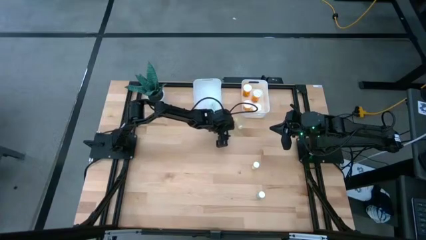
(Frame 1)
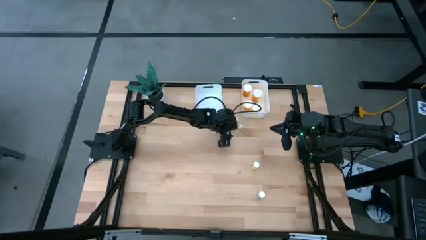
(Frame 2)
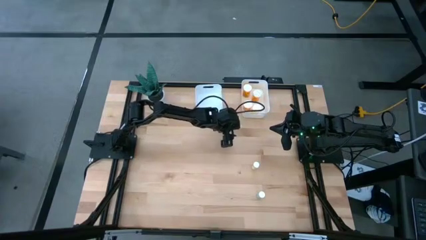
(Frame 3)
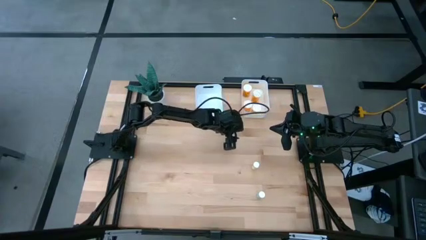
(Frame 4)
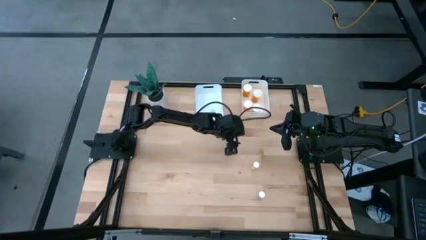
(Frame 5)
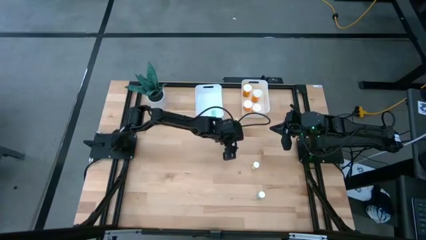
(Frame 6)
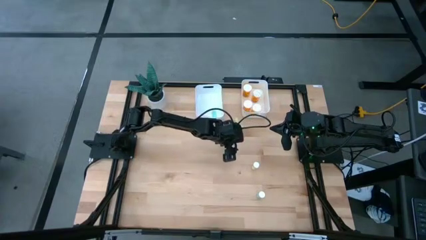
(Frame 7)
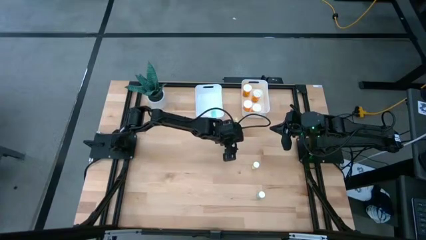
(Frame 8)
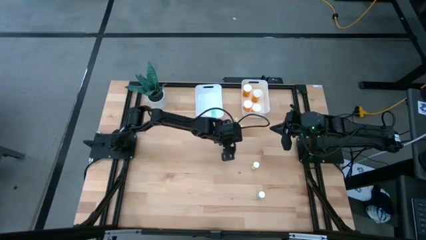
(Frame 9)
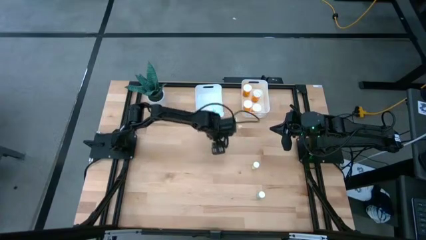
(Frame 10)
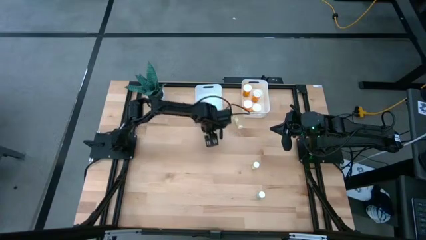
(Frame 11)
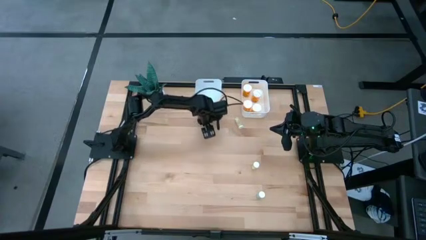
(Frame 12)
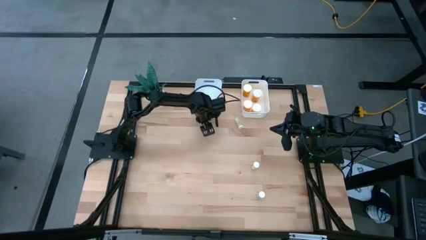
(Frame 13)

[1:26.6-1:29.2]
Task: Pick and place medicine bottles into bin by pill shape (circle, oval)
Adjust the left white bin

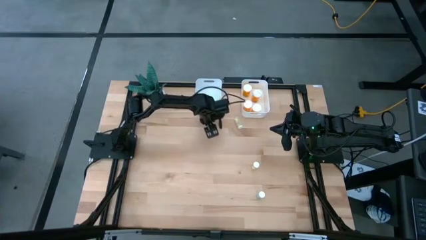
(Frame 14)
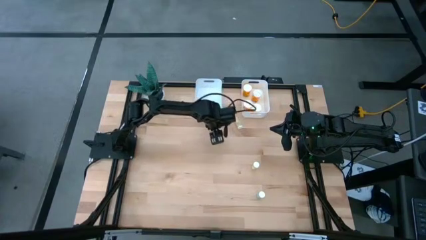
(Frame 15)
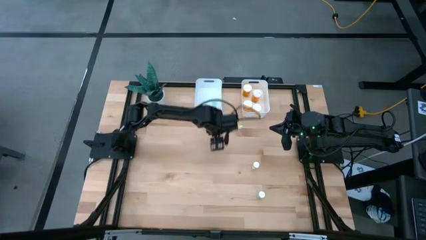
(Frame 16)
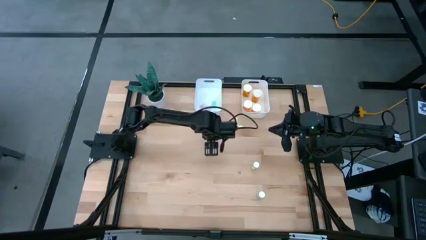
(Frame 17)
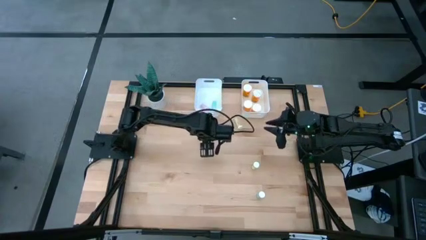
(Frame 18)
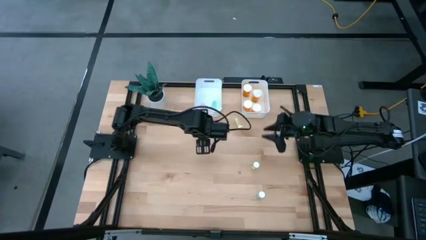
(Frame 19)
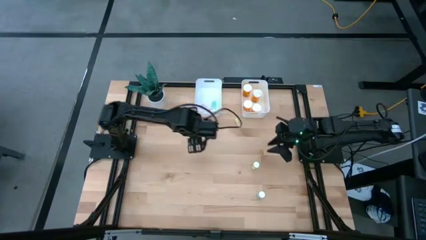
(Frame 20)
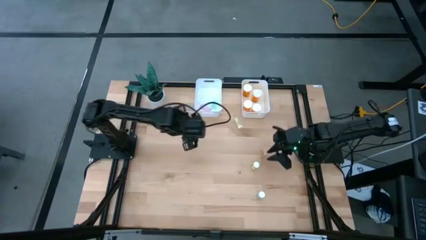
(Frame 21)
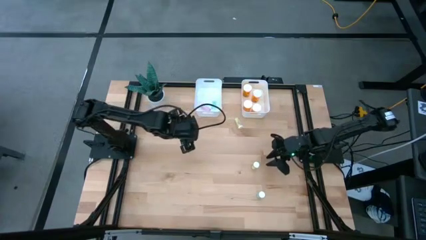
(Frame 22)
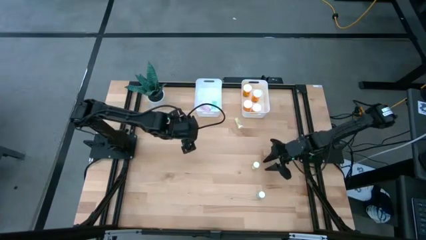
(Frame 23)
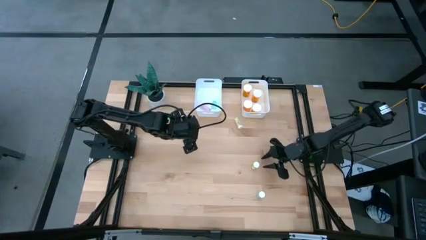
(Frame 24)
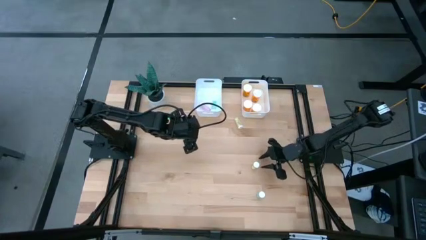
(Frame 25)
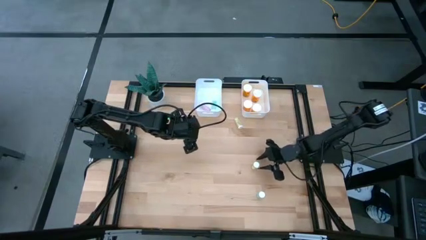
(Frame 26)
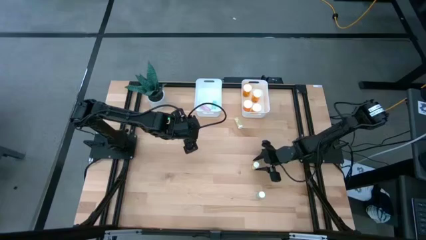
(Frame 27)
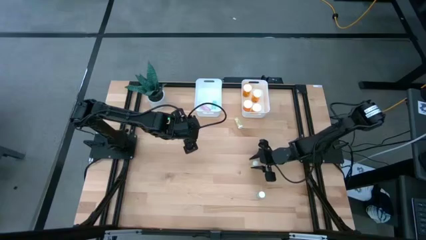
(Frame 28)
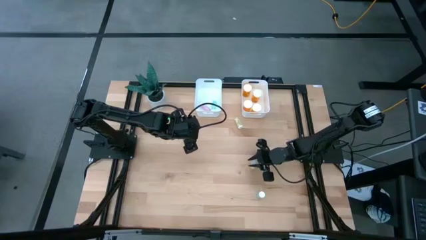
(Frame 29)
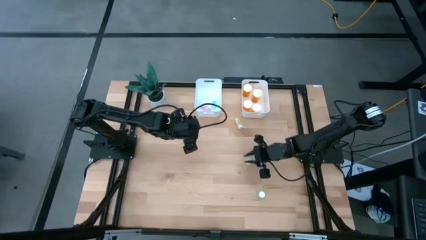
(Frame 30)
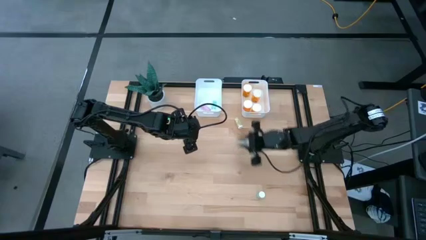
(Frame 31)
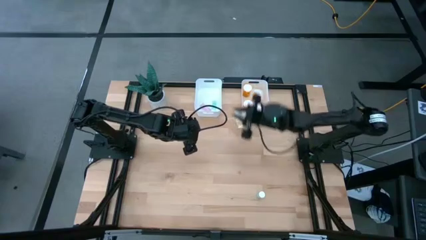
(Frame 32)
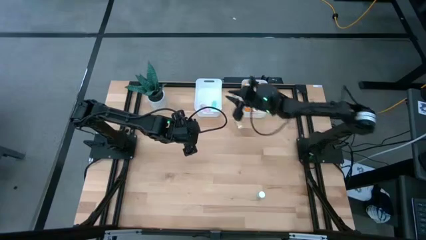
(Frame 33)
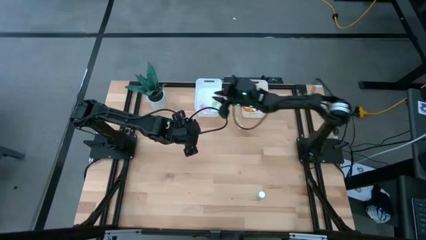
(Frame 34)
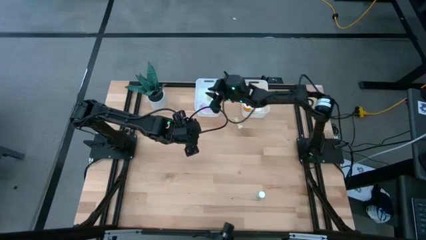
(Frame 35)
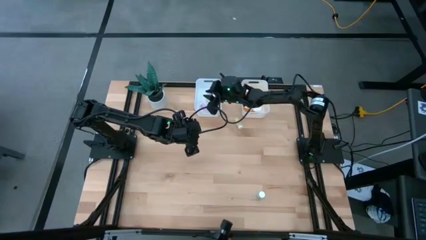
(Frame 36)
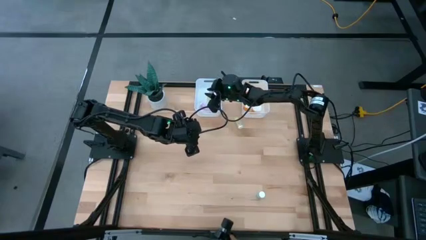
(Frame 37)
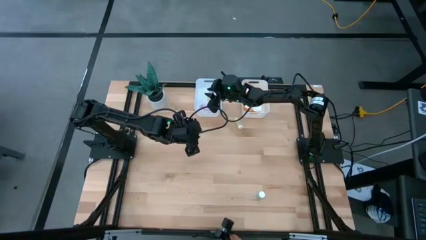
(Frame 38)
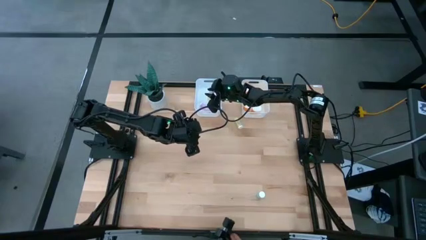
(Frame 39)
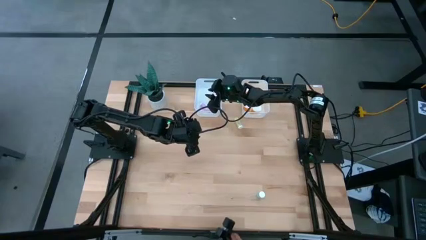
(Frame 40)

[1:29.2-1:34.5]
Put the small yellow tablet bottle into the left white bin

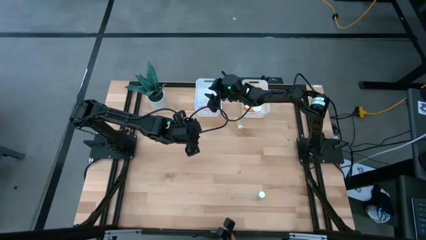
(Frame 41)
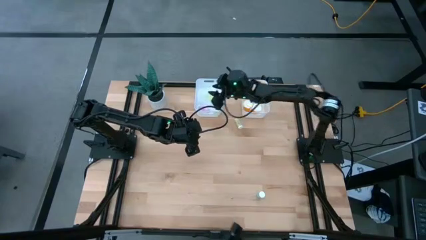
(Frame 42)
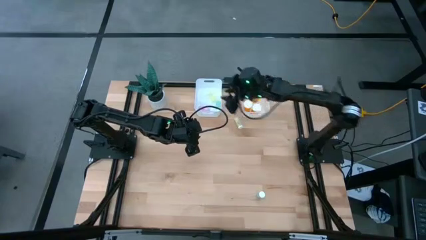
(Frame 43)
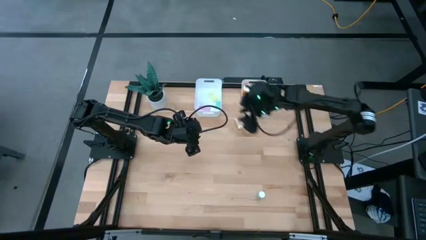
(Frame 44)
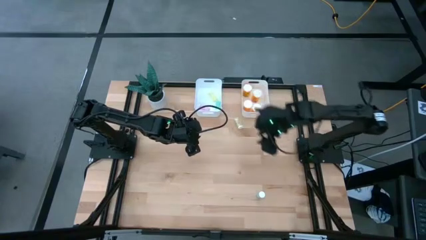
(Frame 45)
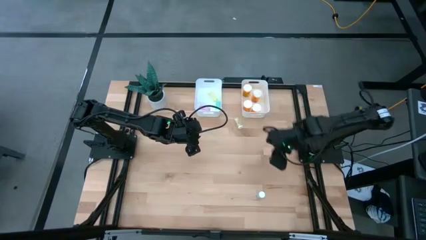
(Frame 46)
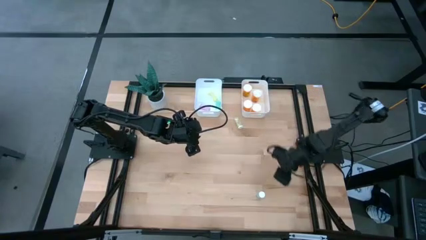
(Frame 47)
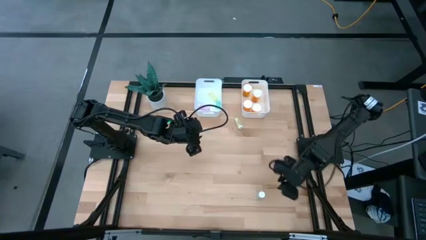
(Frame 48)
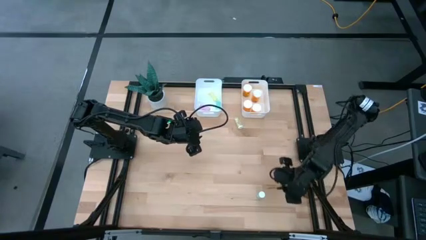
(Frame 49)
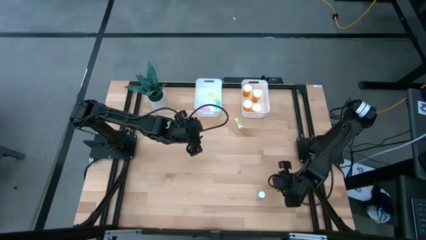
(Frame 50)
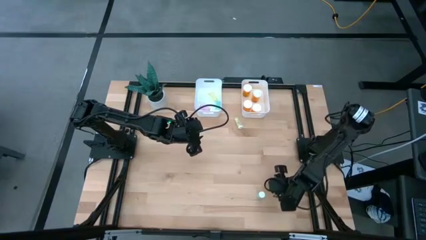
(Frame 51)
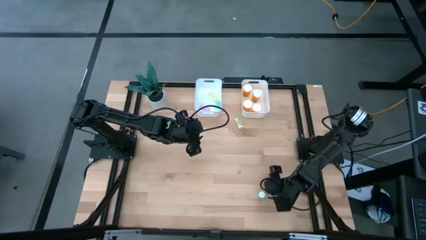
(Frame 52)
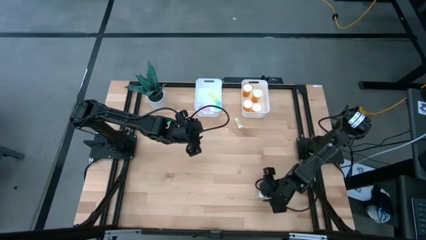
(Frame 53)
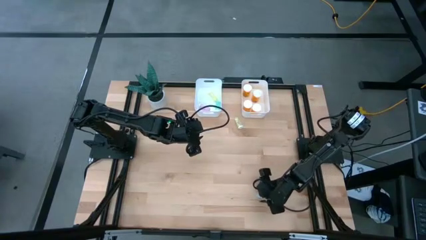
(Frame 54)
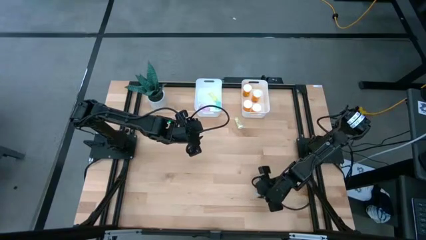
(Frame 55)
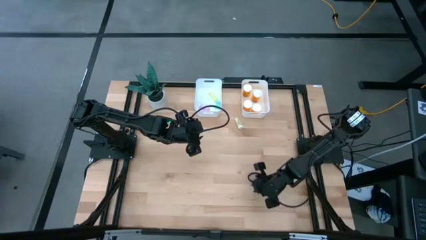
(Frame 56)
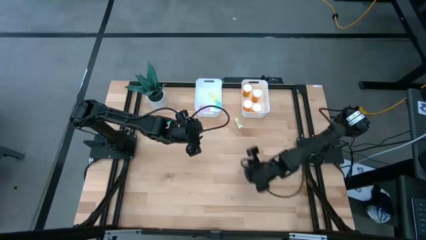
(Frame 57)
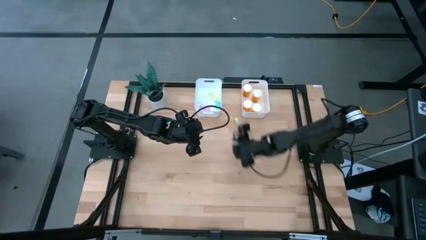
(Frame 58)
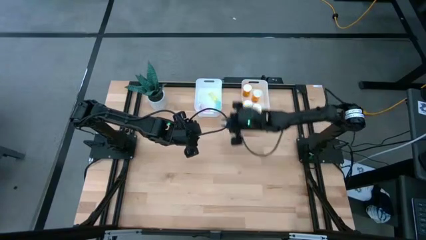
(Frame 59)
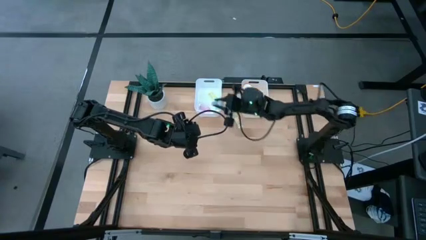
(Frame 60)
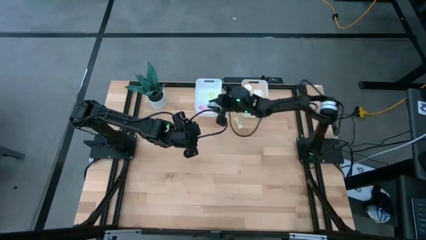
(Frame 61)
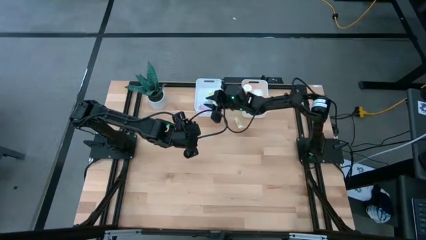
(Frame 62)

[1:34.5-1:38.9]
Put the small blue tablet bottle into the left white bin

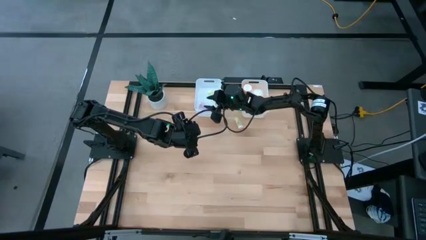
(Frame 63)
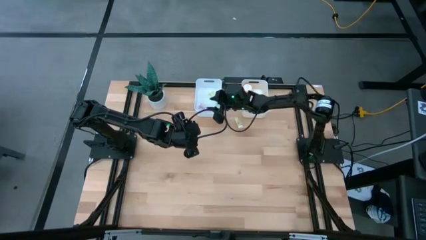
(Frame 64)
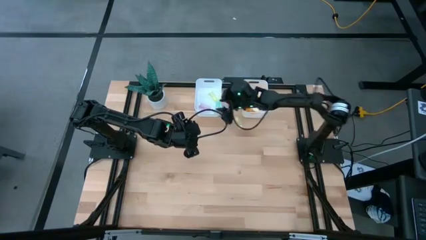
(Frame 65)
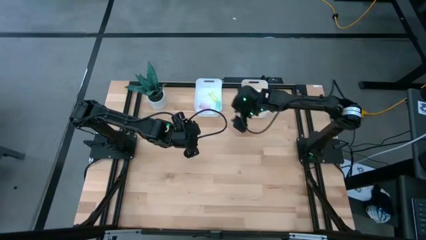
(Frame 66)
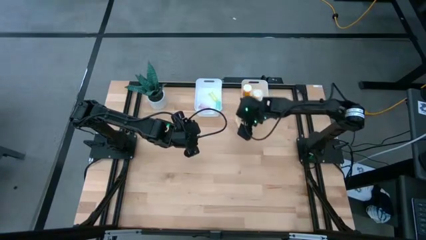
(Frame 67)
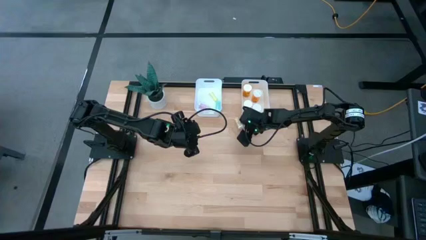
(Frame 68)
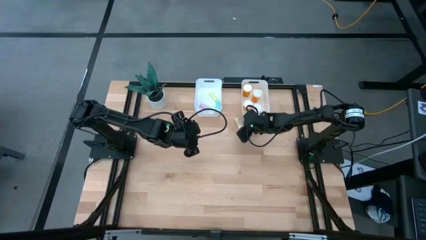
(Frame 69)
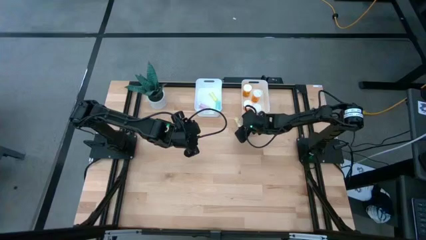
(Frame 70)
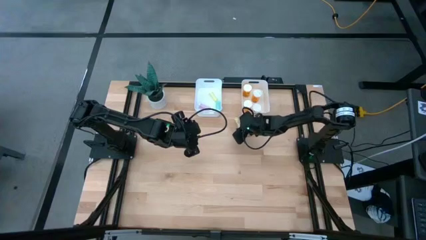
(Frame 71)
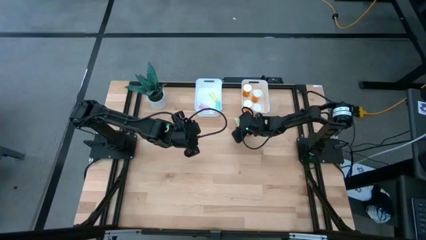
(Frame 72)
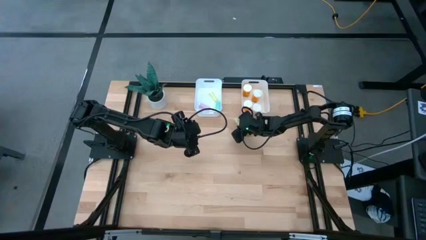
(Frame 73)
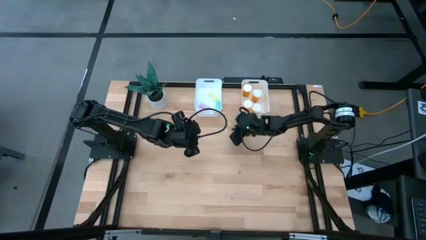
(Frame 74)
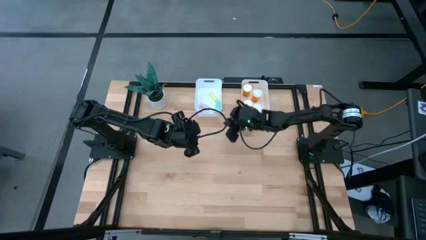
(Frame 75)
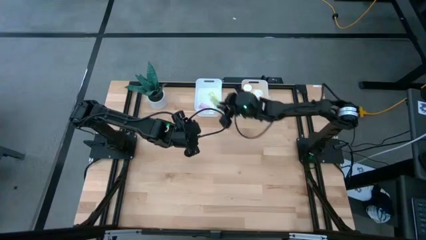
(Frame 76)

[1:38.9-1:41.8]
Put the small yellow tablet bottle into the left white bin
